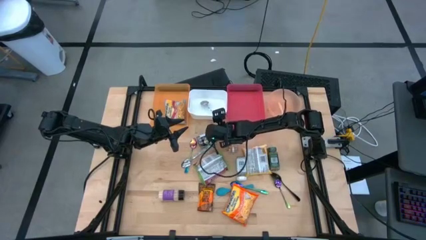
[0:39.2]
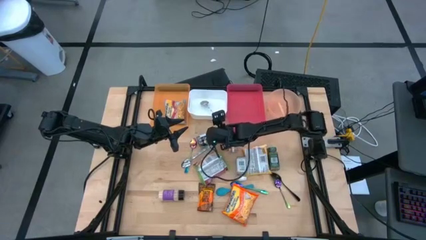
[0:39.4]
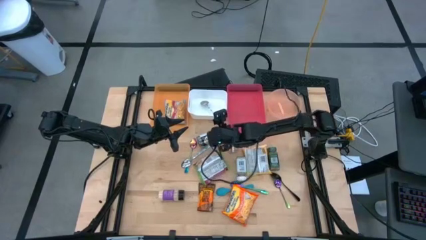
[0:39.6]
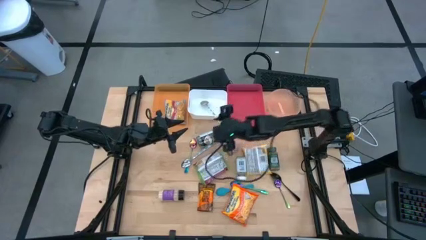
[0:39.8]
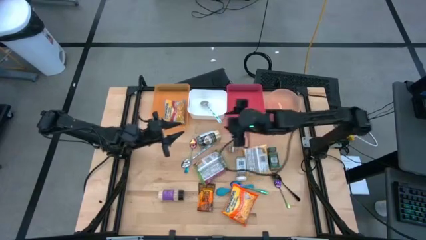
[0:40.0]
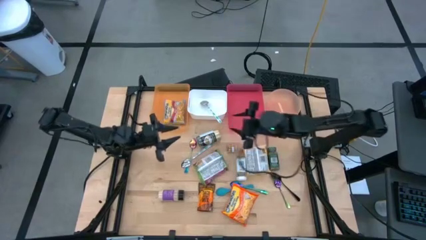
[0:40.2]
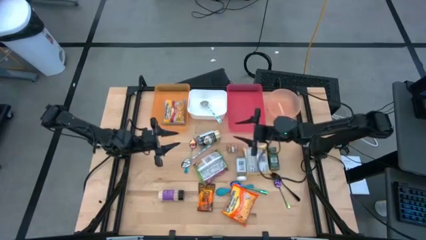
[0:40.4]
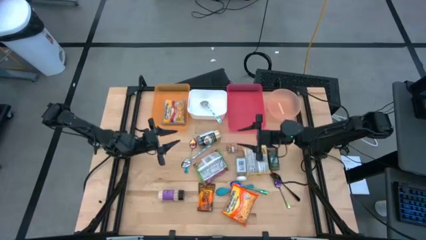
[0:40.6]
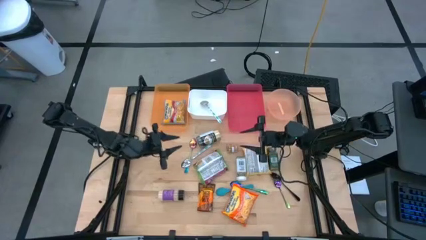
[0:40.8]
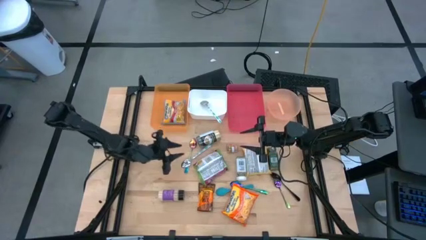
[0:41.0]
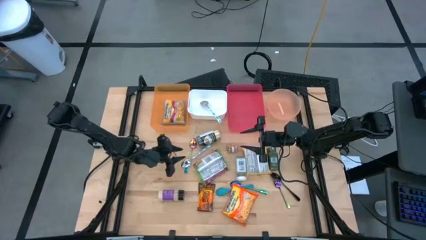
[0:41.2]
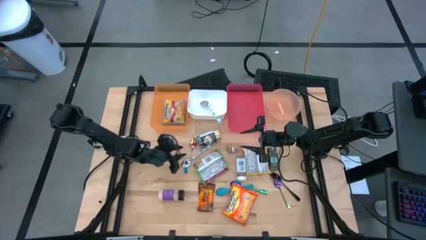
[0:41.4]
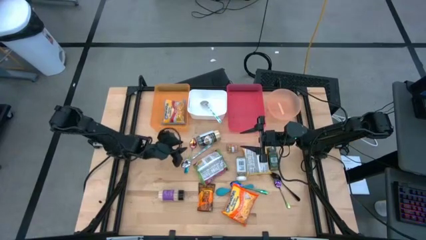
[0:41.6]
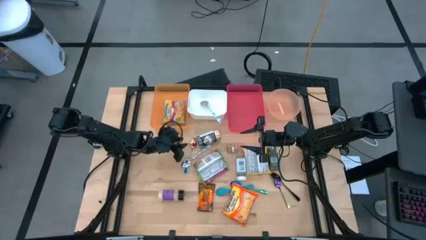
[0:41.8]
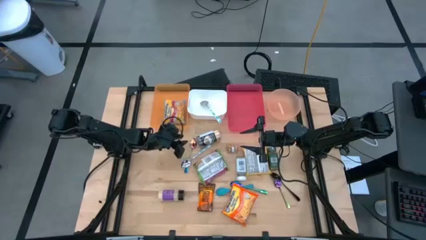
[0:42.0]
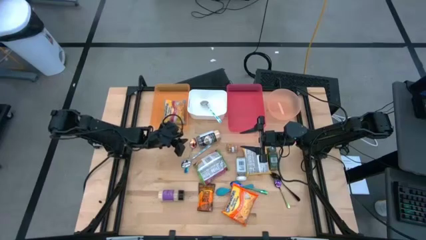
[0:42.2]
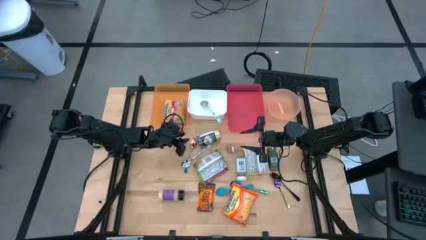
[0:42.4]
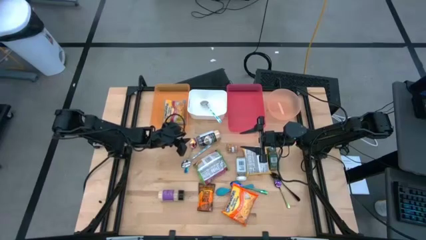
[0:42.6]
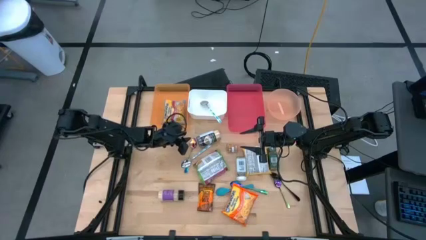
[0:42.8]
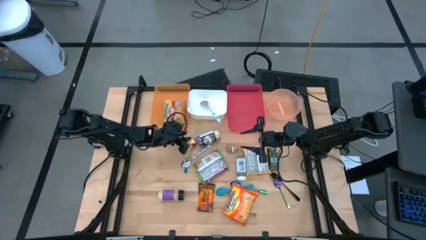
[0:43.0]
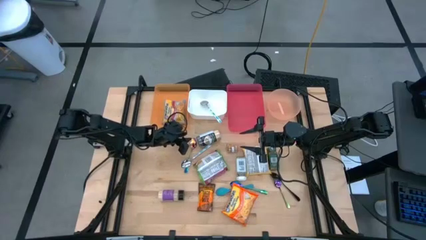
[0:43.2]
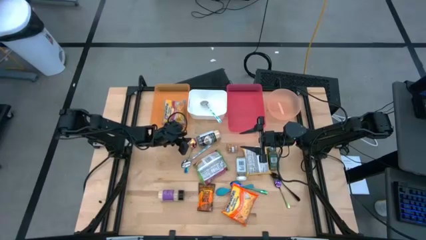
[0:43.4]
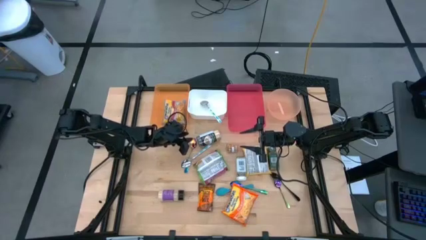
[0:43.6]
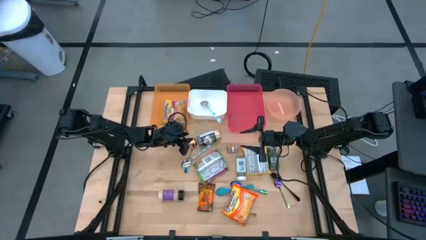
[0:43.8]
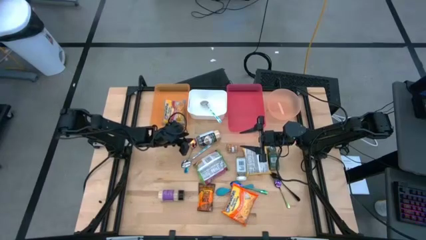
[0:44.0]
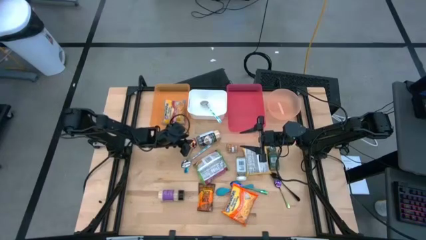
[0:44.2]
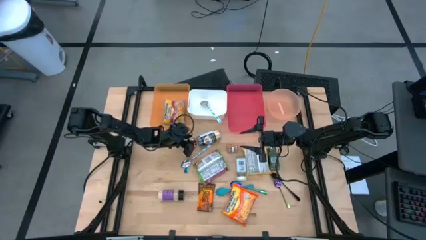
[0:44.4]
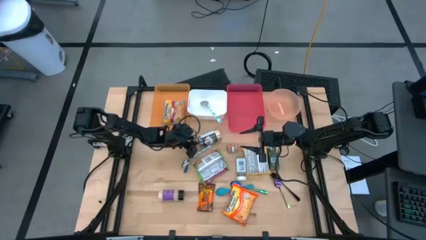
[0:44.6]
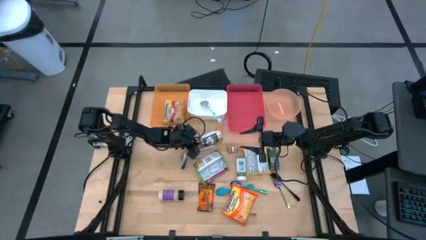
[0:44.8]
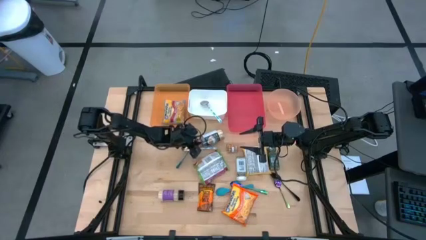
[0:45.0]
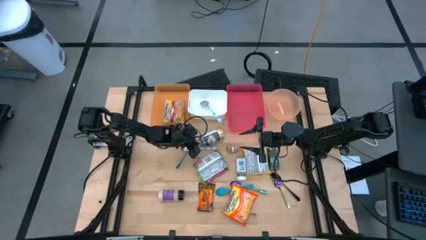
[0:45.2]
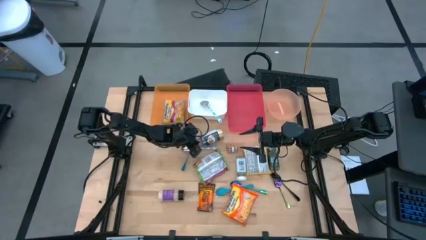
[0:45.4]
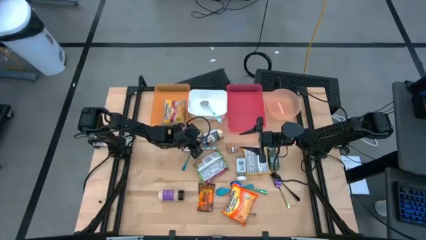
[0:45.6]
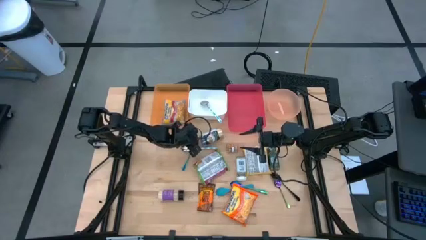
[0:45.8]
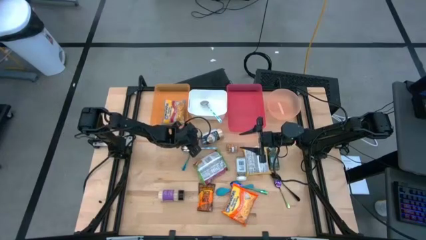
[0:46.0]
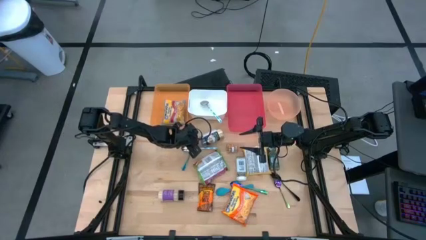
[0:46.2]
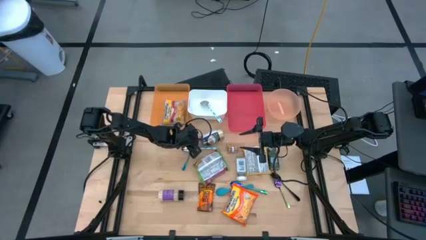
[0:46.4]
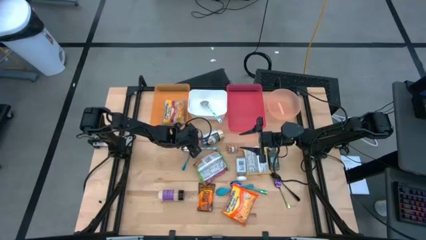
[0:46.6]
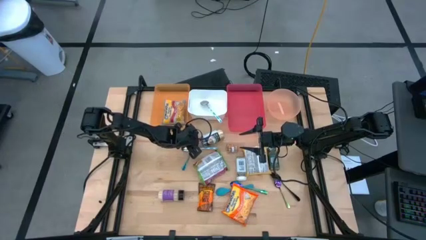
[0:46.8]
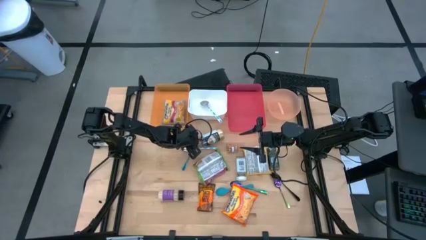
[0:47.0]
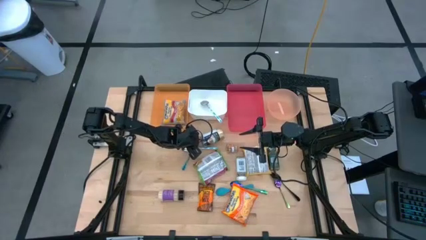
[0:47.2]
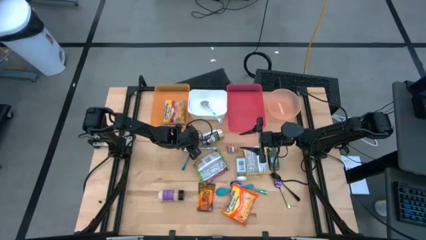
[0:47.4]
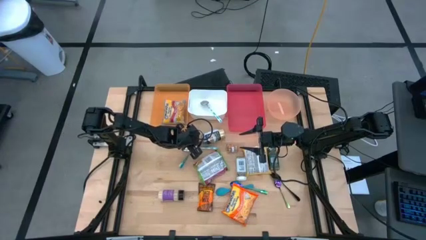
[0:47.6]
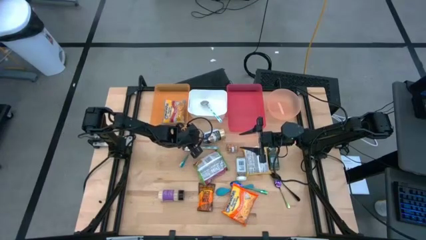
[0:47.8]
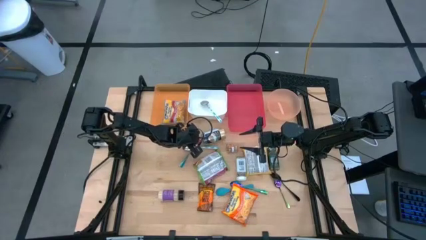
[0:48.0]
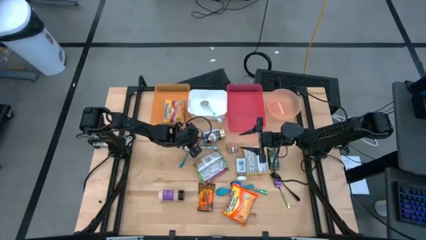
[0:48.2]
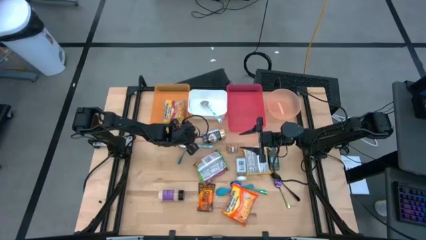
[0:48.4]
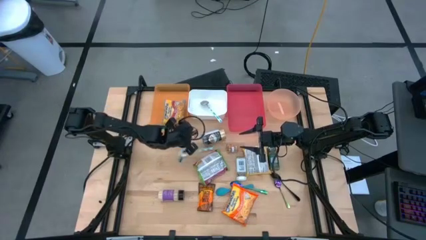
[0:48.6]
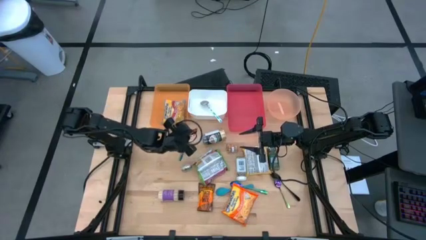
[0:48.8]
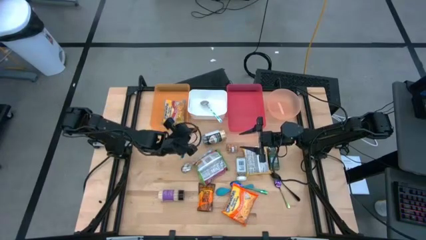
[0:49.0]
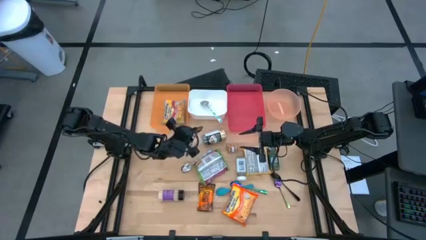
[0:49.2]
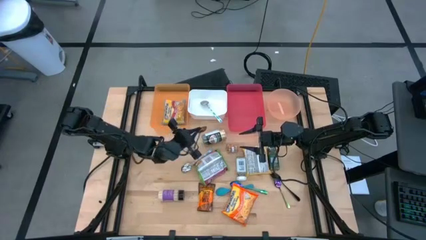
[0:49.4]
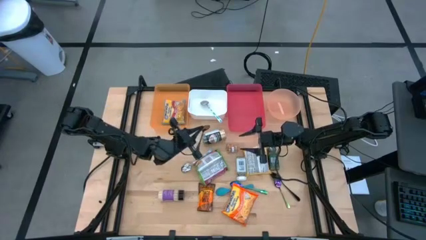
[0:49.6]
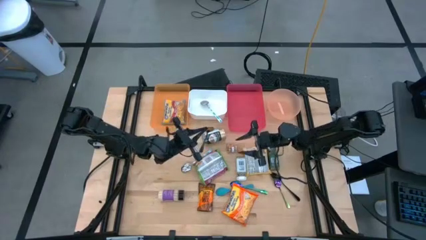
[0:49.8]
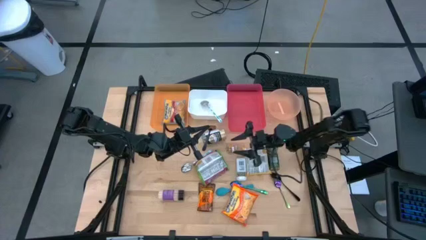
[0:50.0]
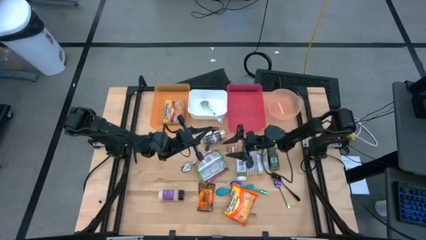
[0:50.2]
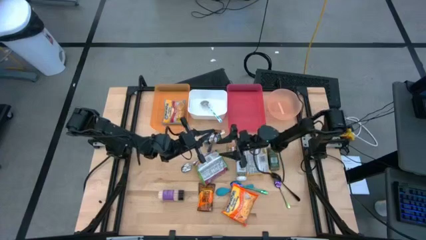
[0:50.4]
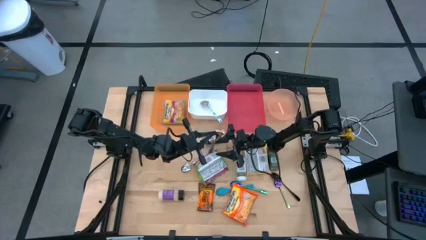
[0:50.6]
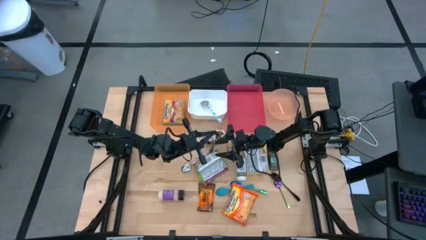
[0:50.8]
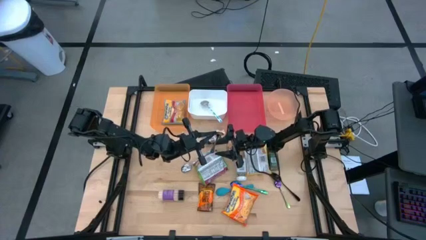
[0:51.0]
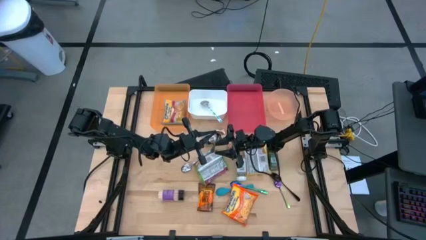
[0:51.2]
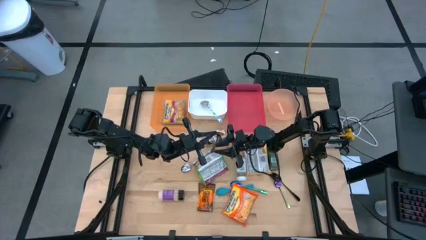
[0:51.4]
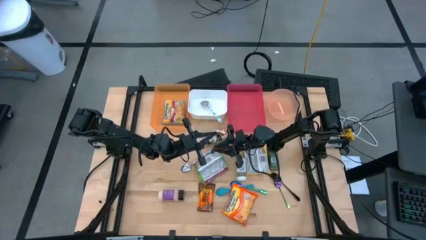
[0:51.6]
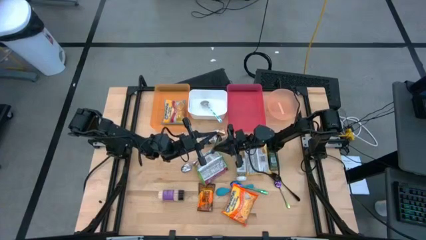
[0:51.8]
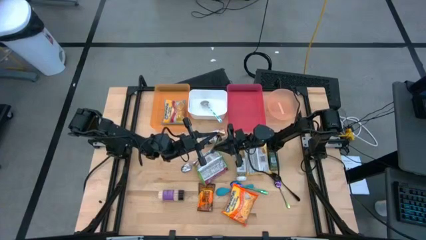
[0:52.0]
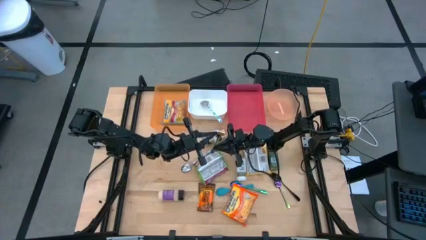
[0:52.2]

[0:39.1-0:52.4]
Task: Pick & Place Food Item
Put the left purple spoon into the white bin
